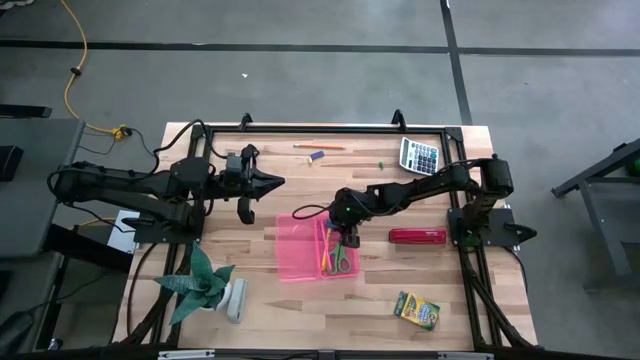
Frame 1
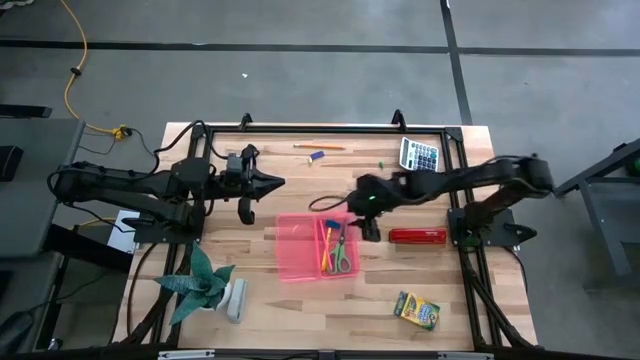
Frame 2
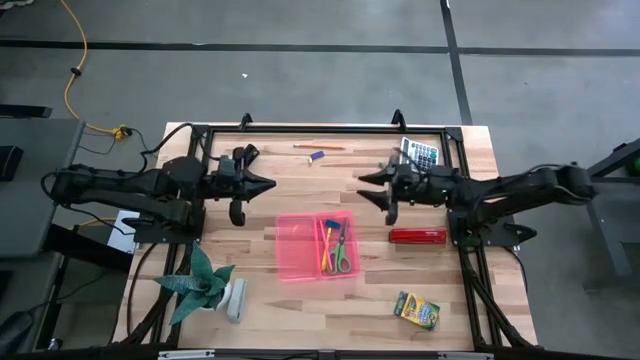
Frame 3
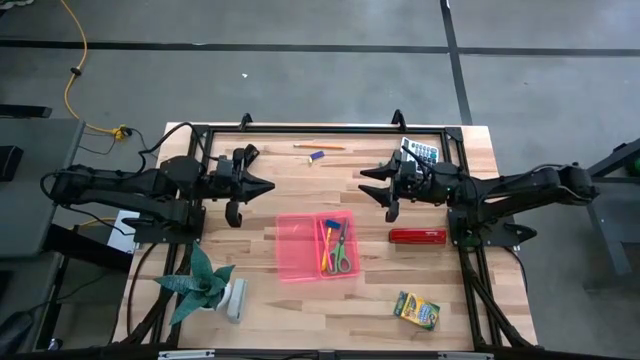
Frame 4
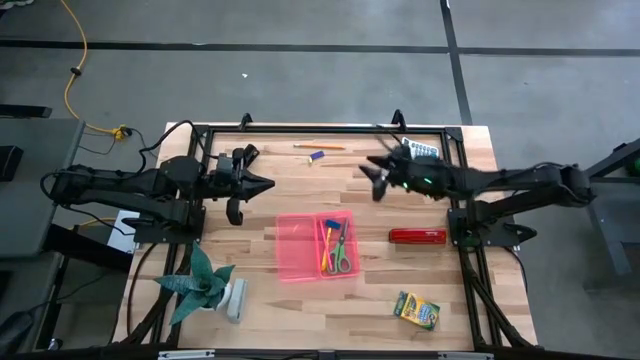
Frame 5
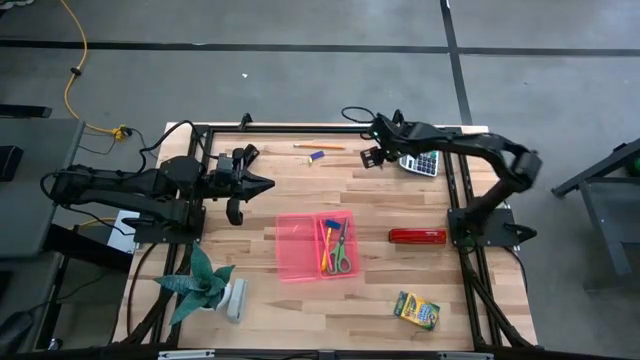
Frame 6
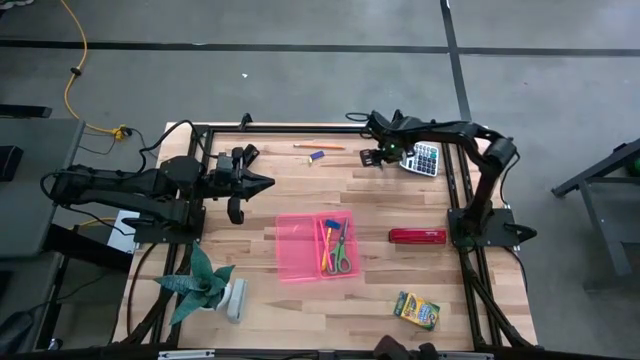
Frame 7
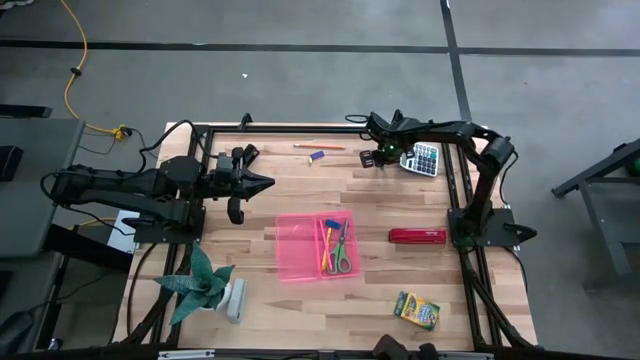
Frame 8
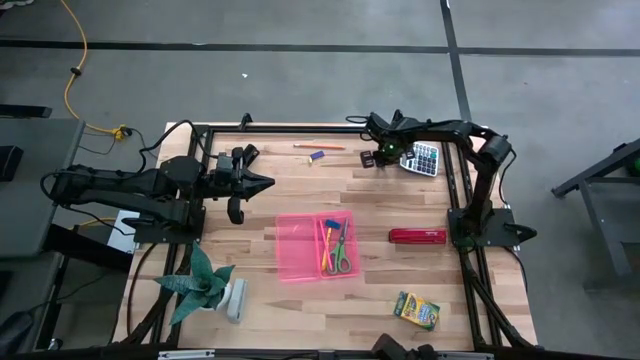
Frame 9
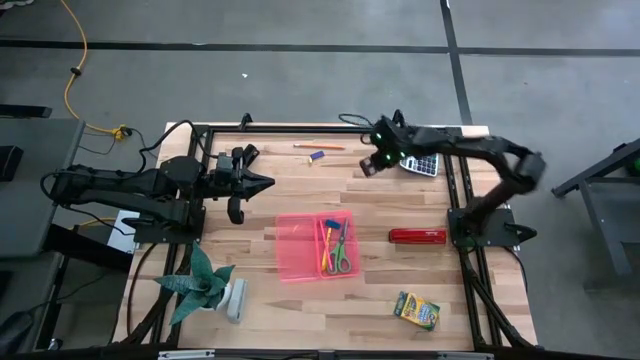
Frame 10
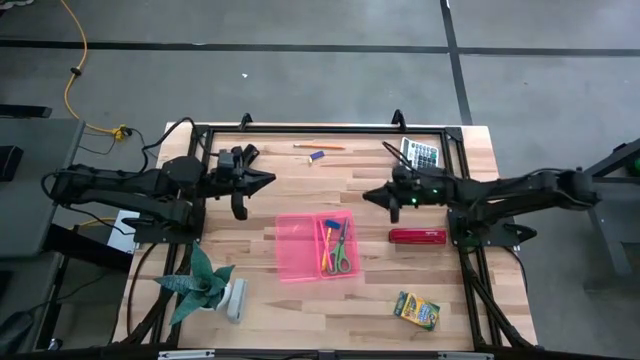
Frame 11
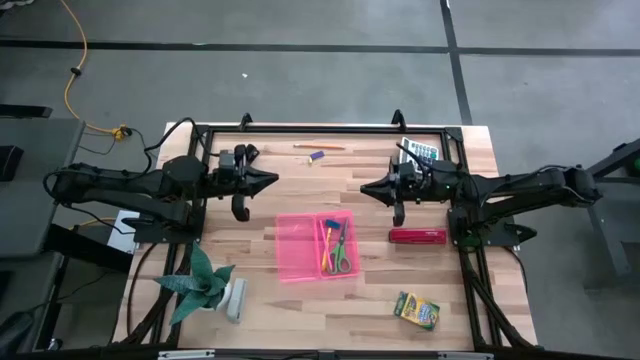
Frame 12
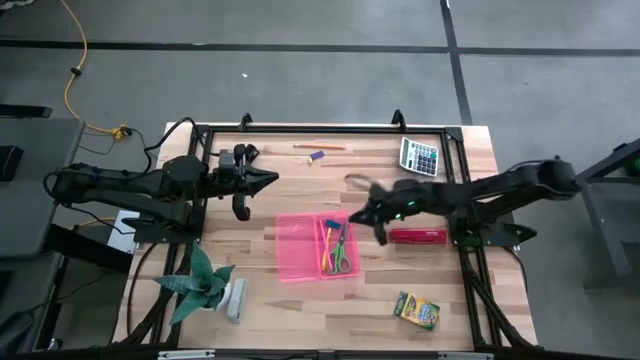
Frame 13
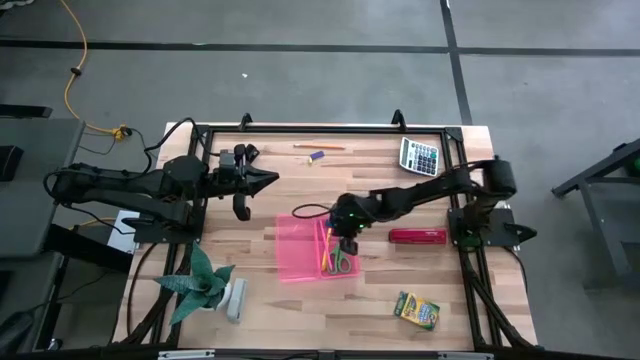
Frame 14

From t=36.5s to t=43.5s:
Task: Pack school essentials
Put the green eraser into the pink supply box

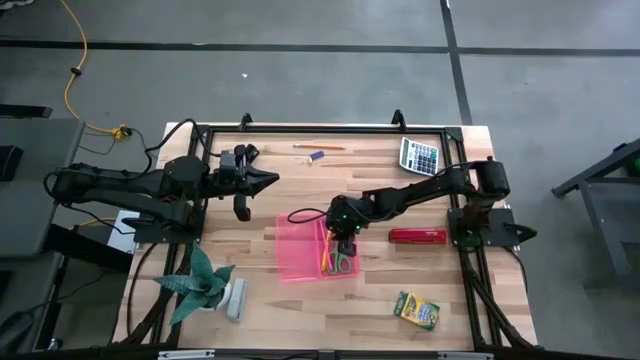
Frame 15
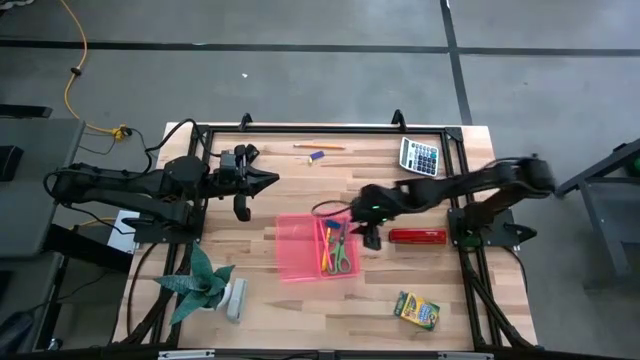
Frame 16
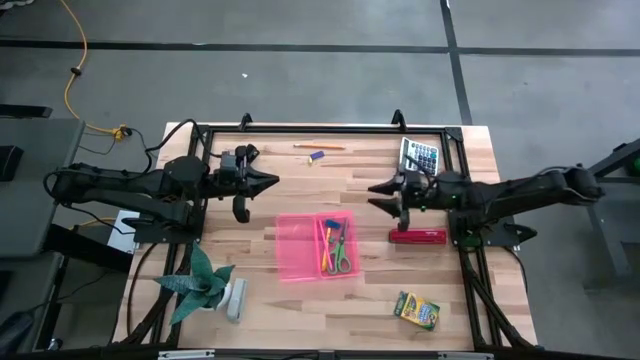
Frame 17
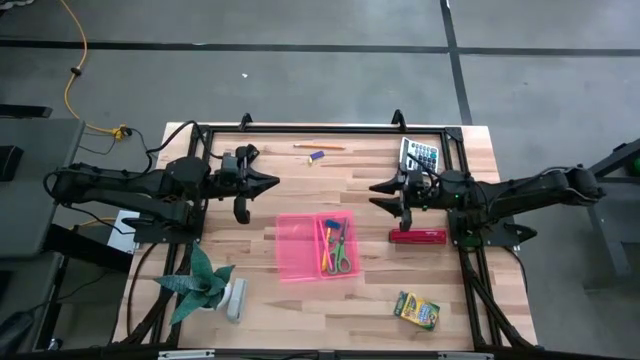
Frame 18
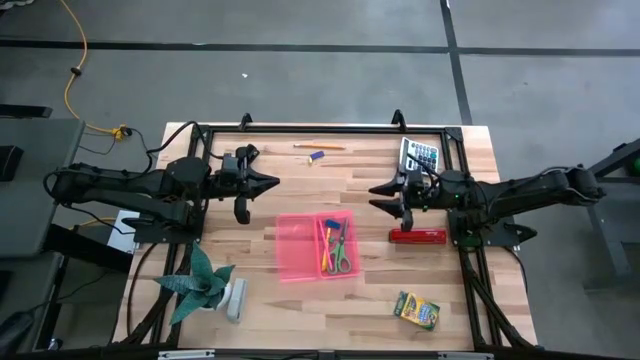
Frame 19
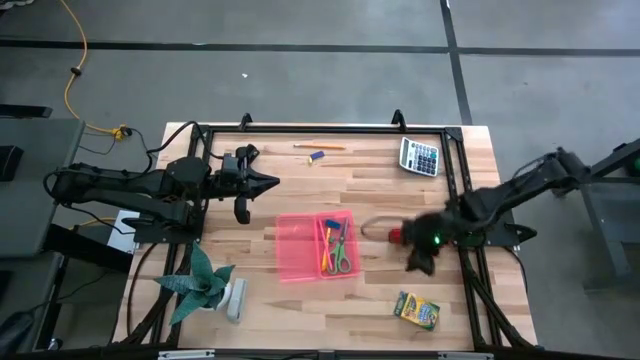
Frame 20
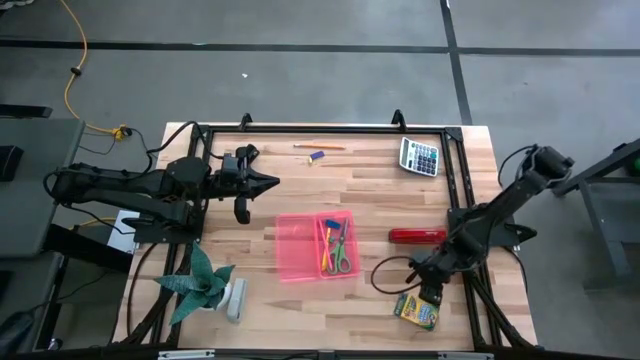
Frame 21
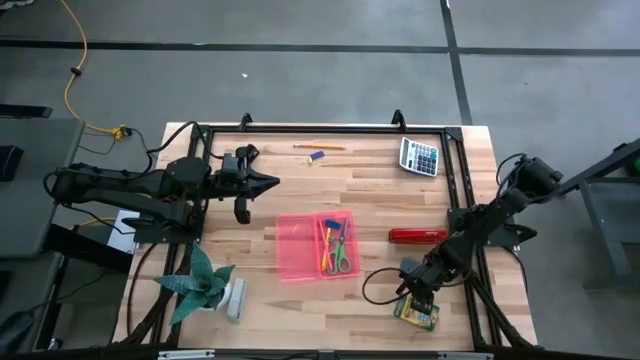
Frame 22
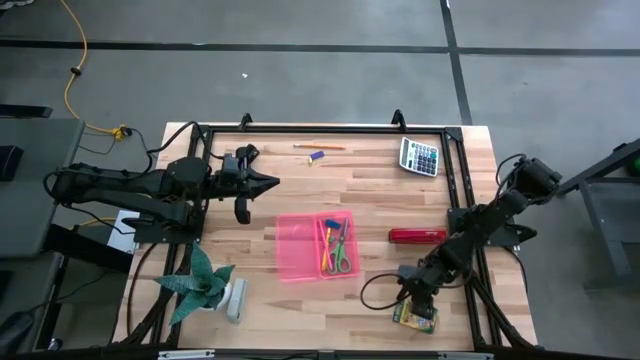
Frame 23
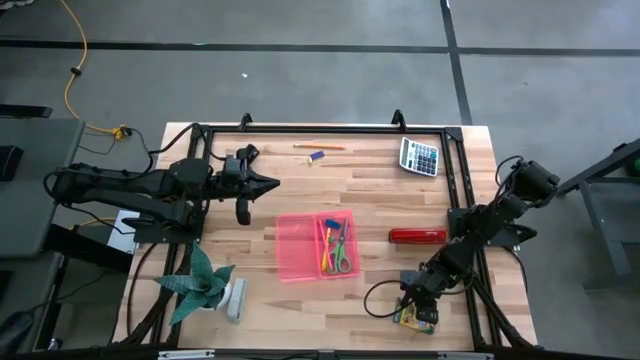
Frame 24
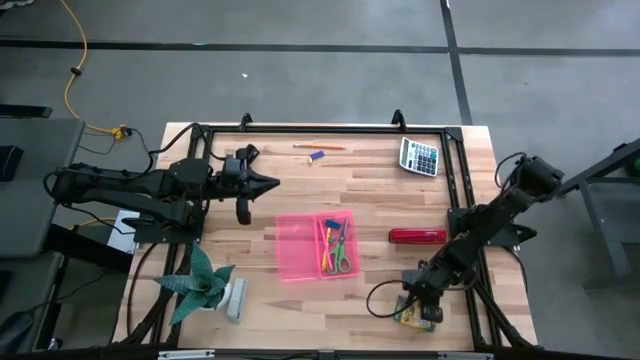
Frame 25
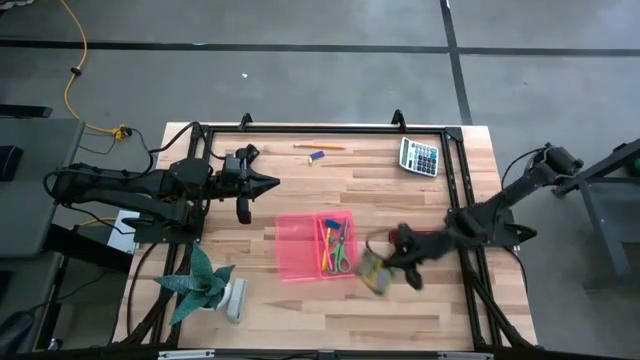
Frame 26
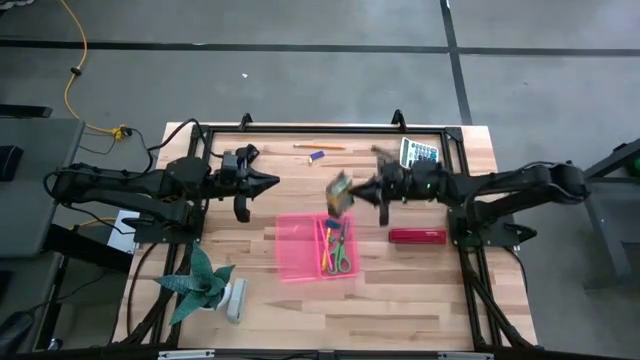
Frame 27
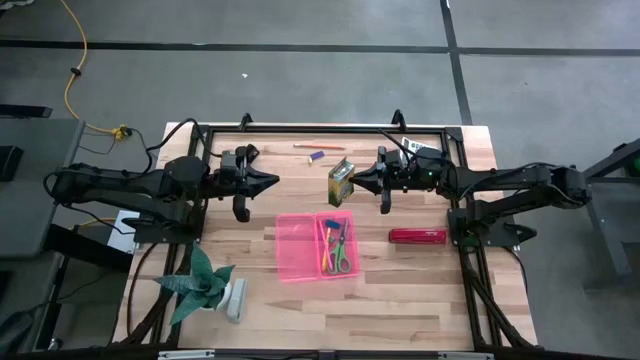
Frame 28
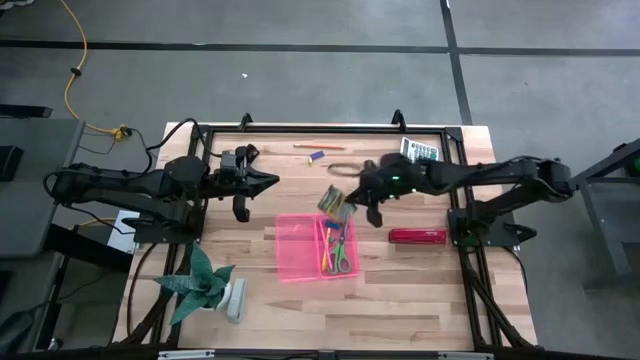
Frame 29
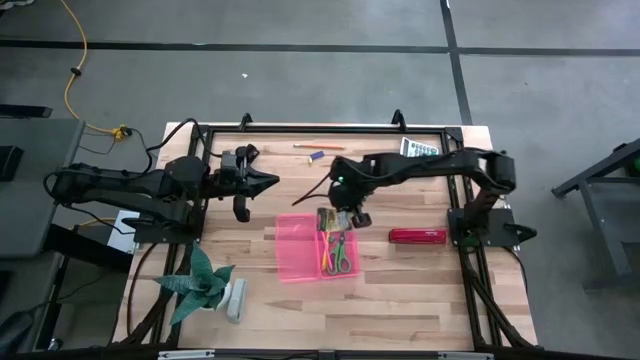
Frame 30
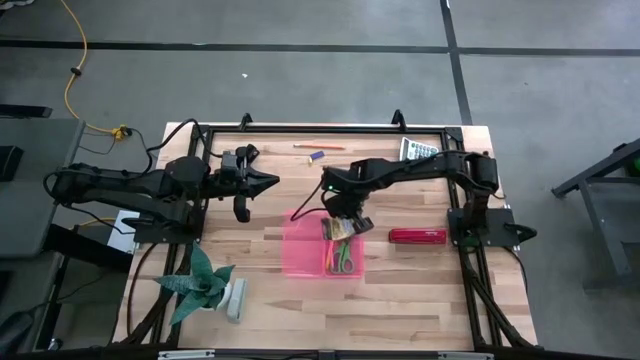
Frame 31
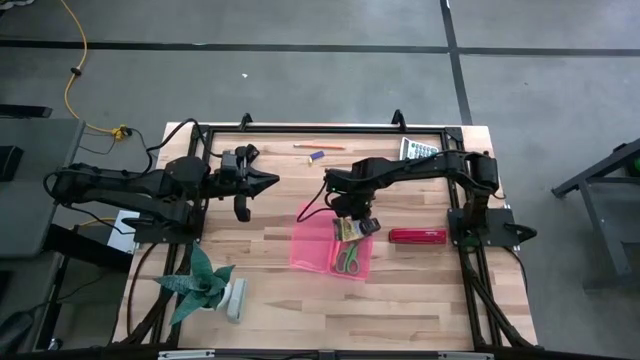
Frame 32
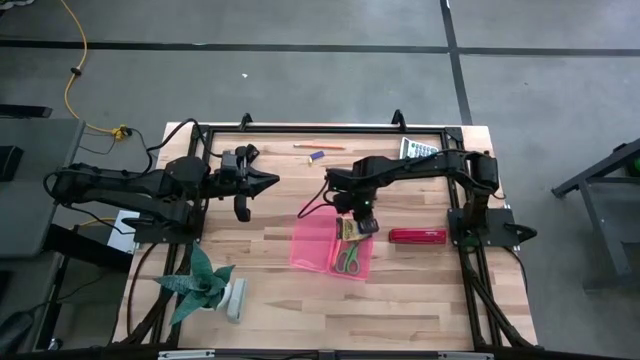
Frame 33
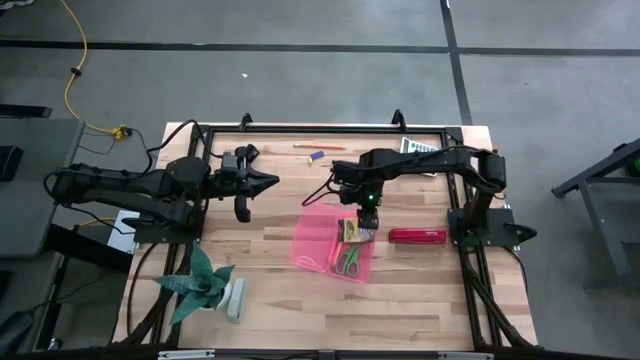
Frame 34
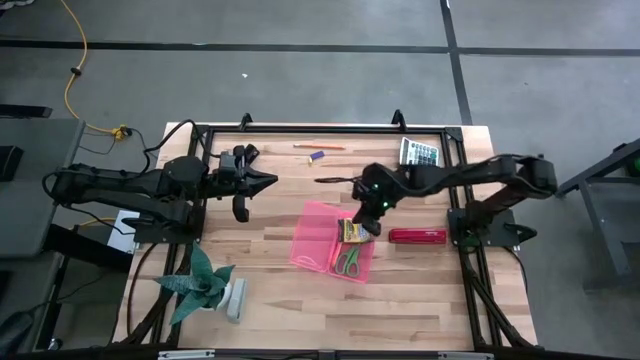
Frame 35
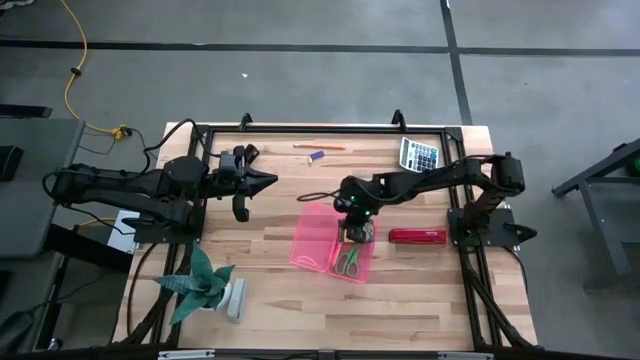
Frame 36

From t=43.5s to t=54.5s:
Put the yellow crayon box into the pink supply box

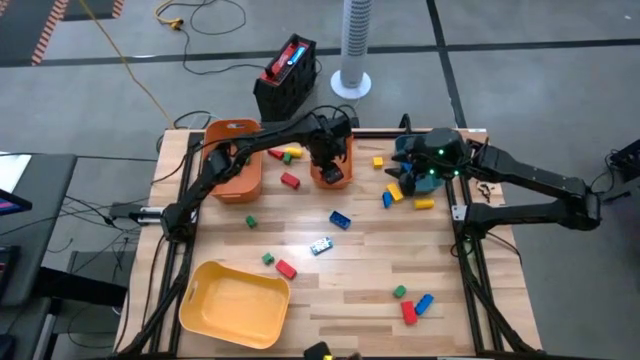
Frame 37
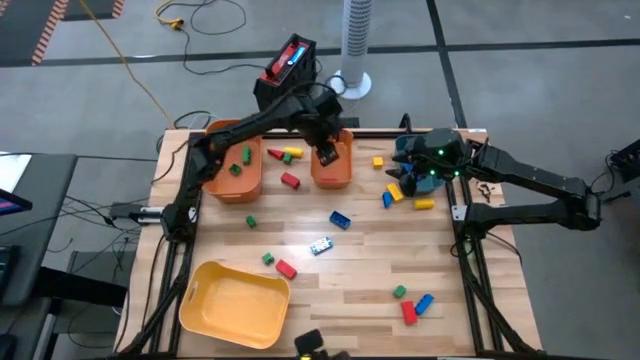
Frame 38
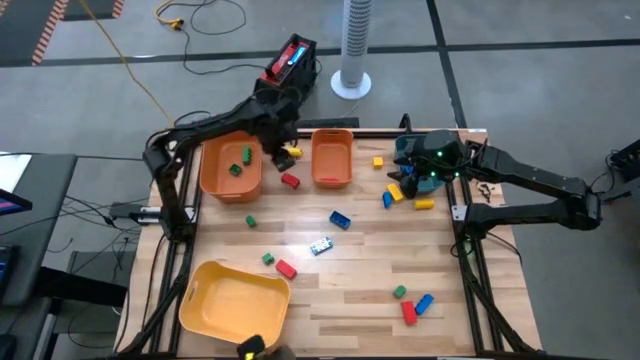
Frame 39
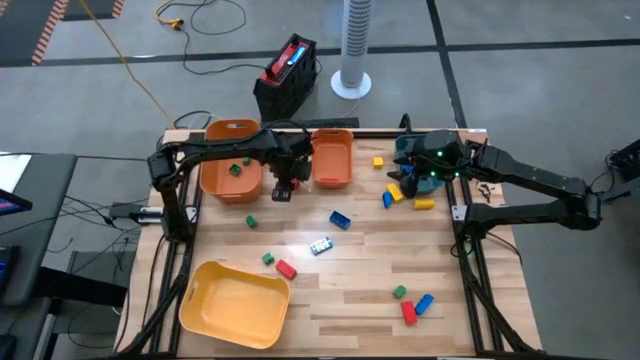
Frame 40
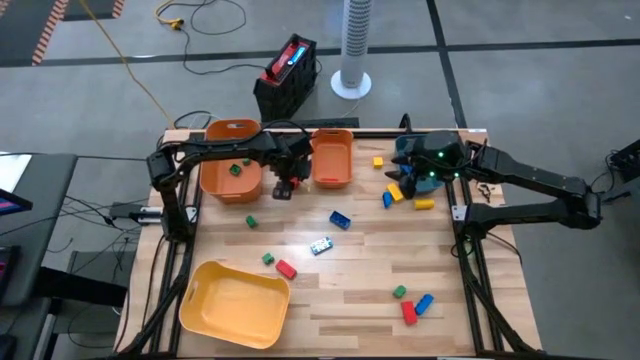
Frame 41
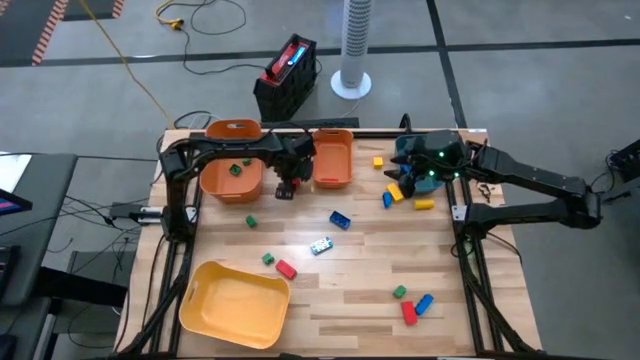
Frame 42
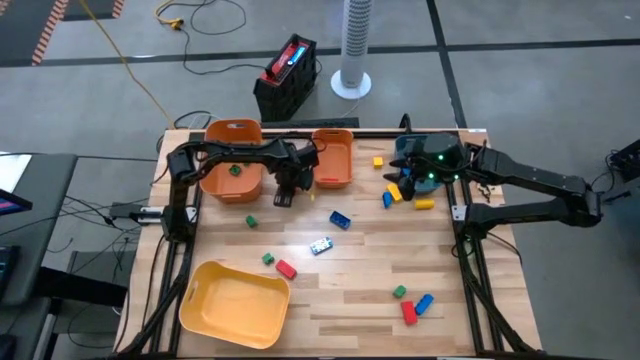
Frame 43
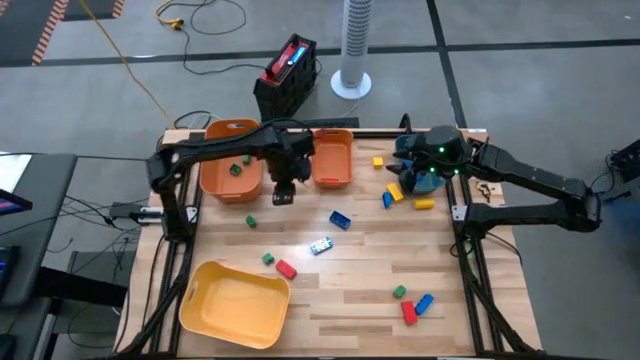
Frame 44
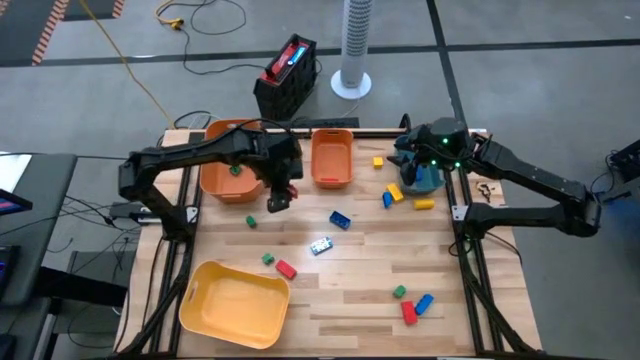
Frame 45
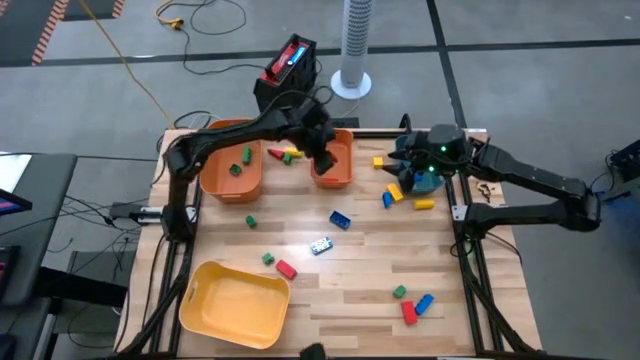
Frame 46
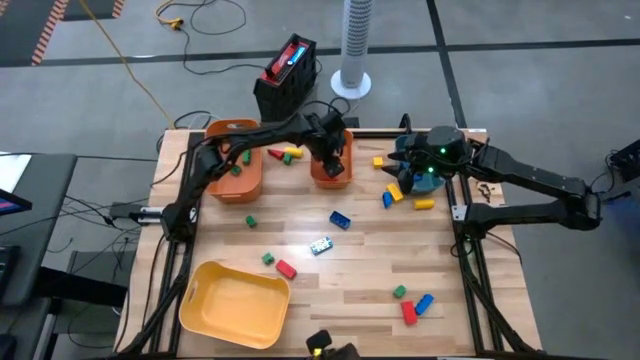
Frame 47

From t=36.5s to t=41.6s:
Task: Sort blocks
Put the red block into the right orange bin
